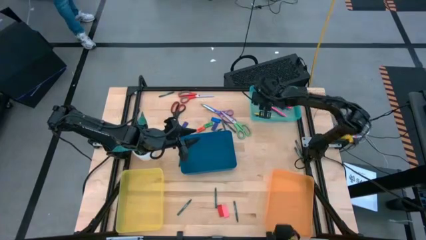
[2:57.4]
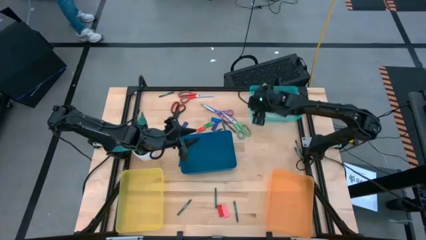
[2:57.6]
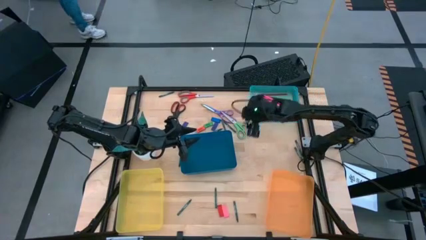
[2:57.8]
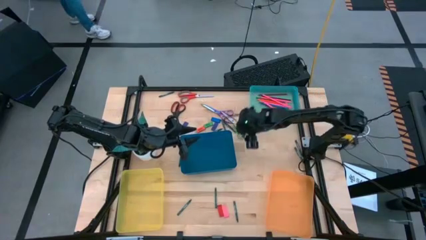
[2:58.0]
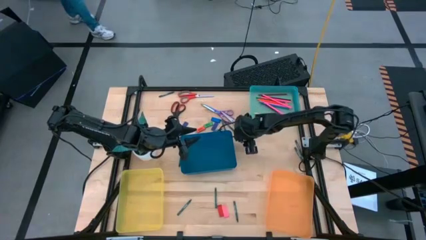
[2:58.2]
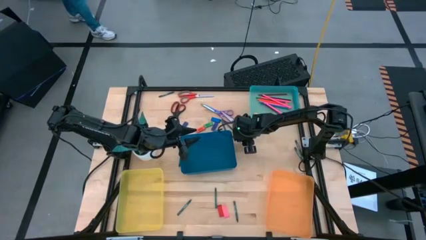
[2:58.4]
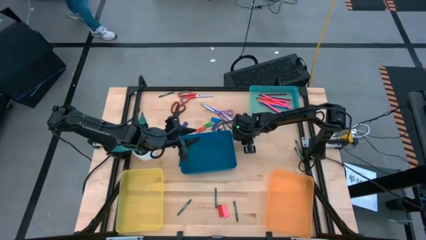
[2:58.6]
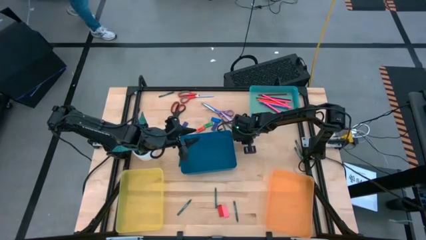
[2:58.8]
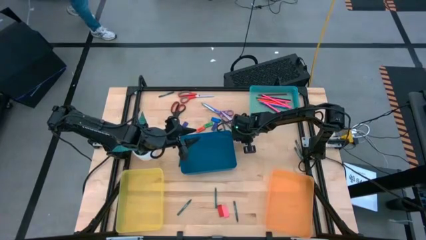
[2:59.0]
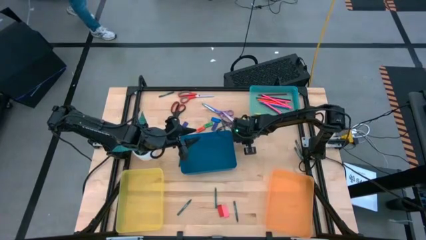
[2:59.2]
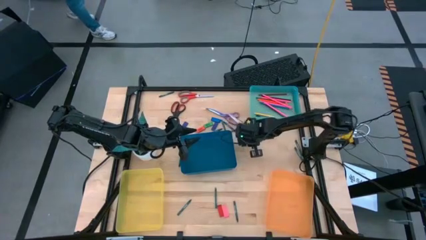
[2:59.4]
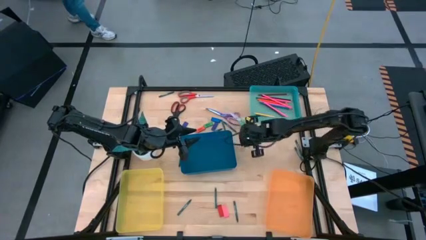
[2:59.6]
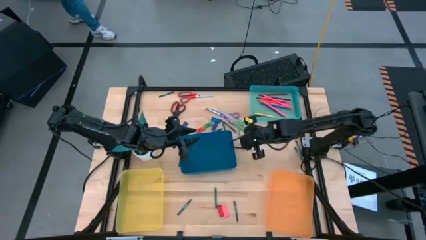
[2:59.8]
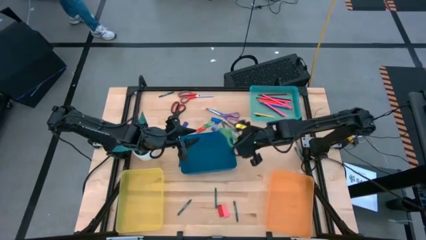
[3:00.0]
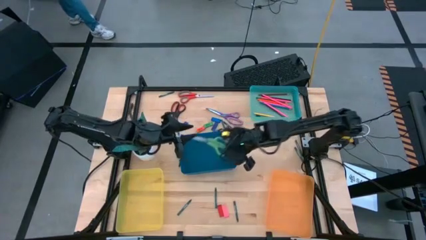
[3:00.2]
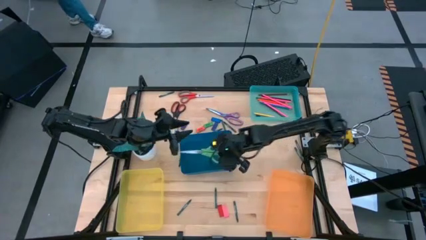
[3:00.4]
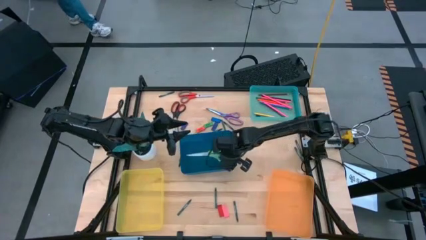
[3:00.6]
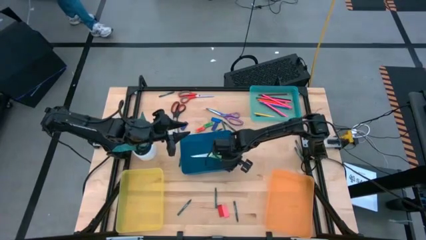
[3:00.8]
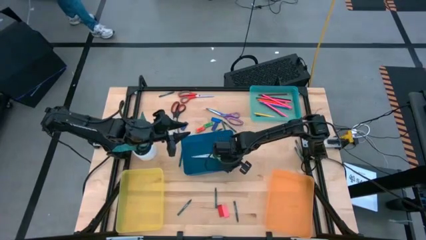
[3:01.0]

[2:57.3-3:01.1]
Task: Sort crayons/erasers/pens/pencils in bins
Put the green scissors into the blue bin

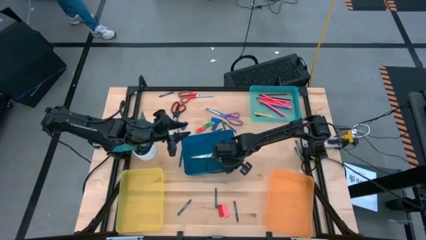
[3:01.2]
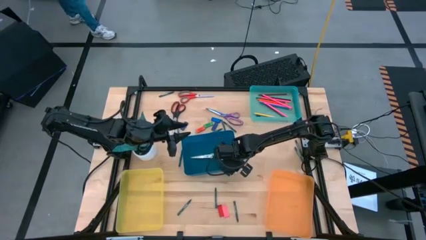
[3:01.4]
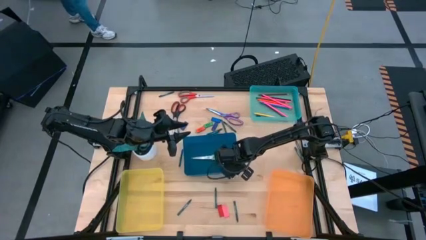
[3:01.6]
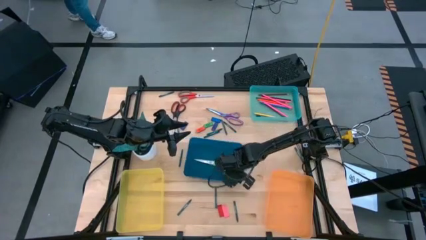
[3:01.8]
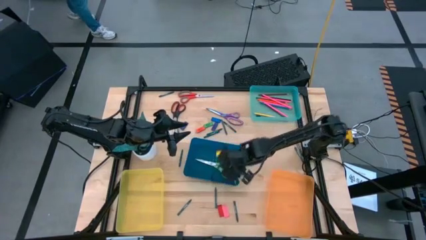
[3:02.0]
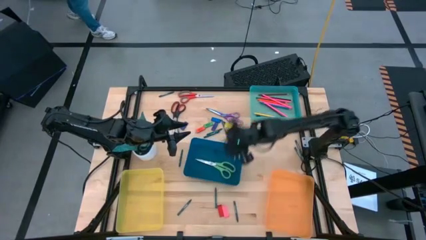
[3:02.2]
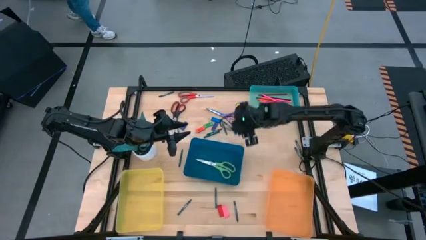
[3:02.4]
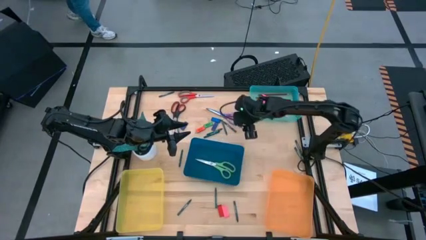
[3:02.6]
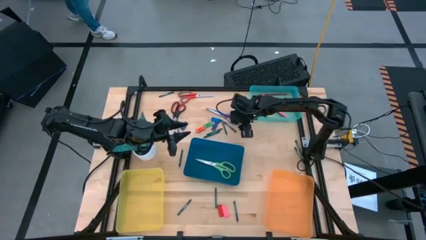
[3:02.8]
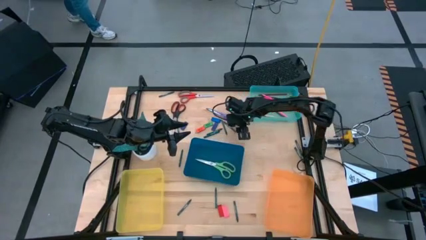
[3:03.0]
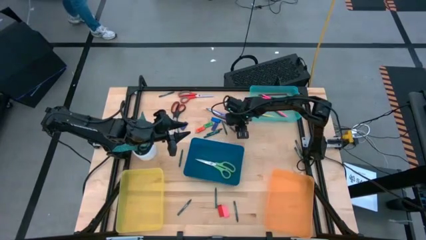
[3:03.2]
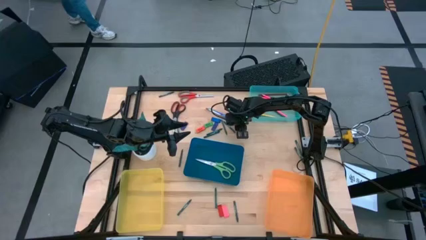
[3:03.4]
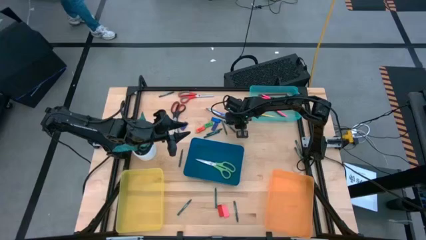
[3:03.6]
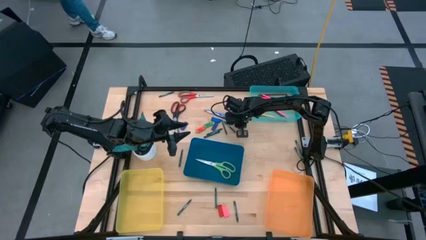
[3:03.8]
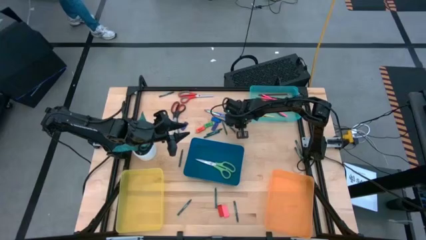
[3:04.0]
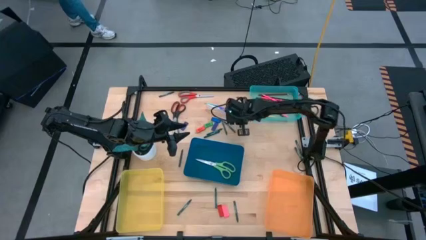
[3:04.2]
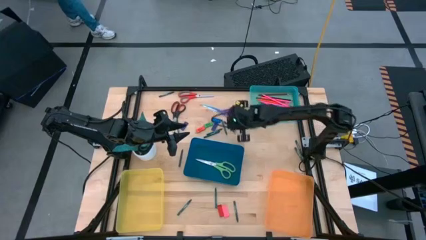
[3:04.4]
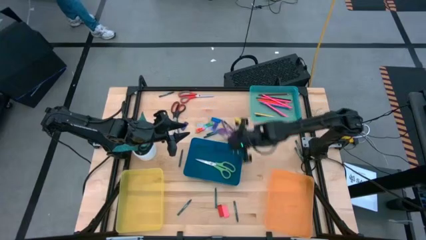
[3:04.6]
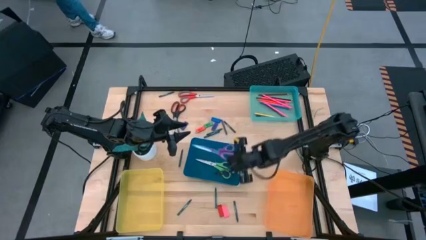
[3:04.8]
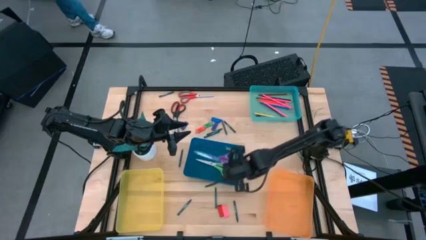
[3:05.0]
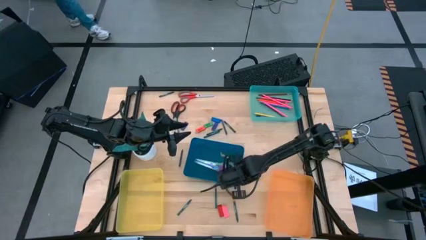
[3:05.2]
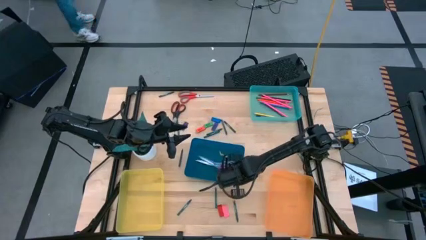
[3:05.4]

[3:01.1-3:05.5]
Put the purple scissors into the blue bin

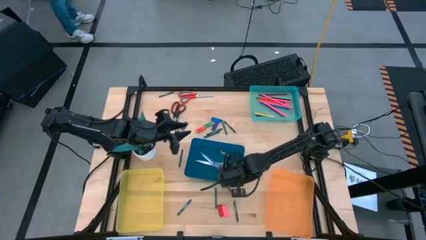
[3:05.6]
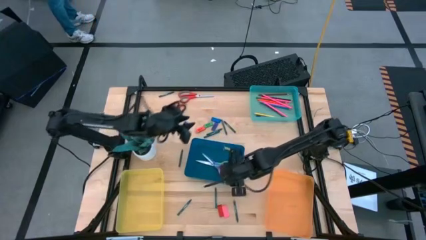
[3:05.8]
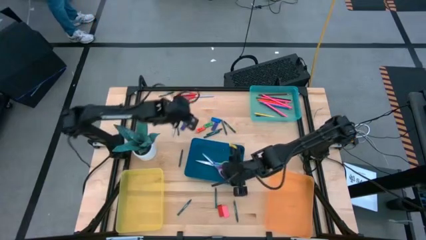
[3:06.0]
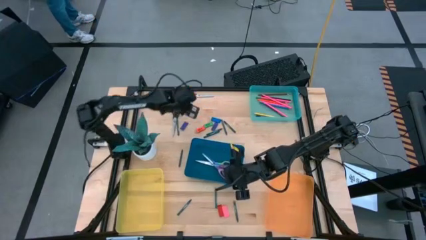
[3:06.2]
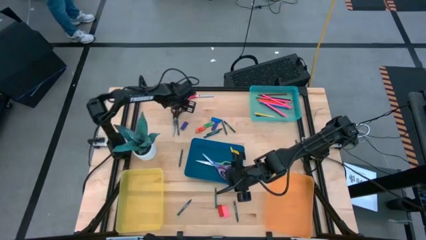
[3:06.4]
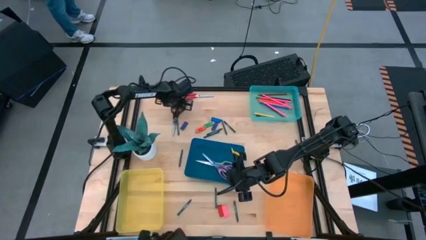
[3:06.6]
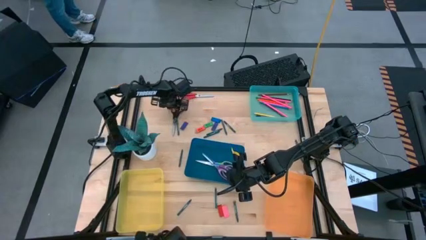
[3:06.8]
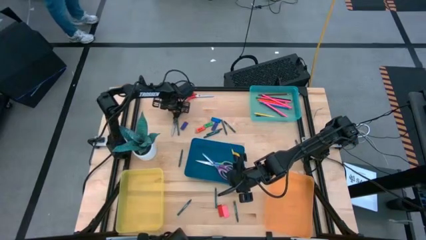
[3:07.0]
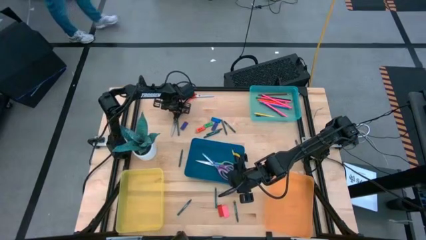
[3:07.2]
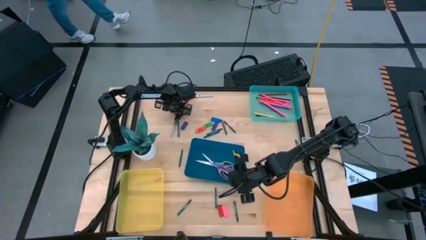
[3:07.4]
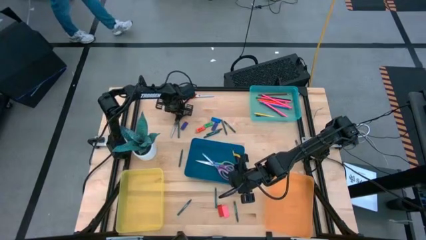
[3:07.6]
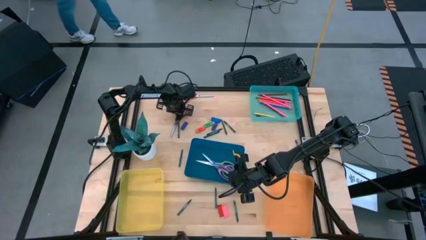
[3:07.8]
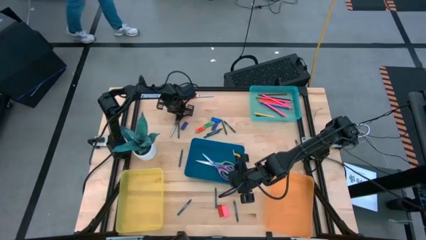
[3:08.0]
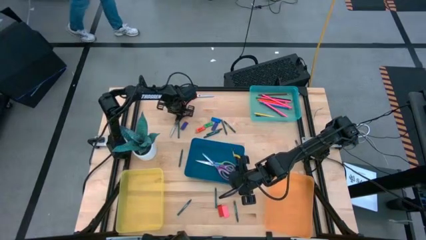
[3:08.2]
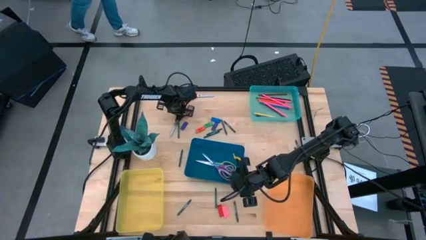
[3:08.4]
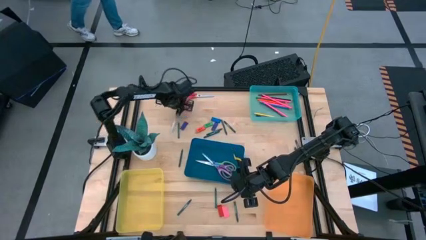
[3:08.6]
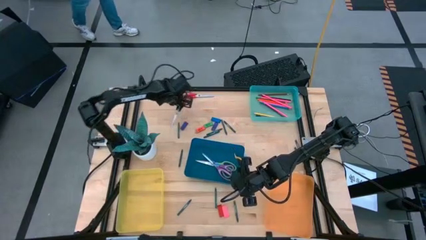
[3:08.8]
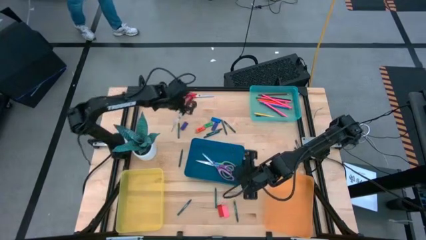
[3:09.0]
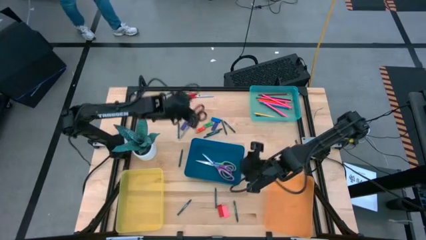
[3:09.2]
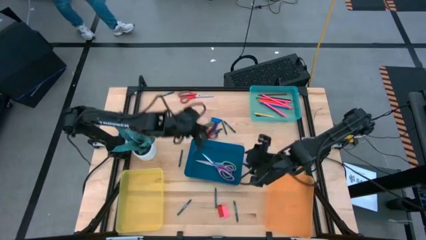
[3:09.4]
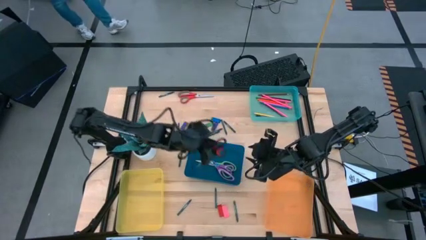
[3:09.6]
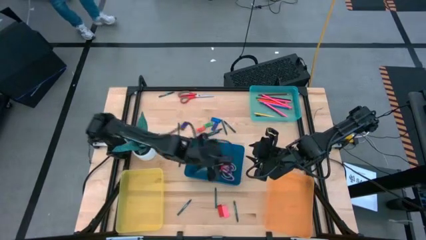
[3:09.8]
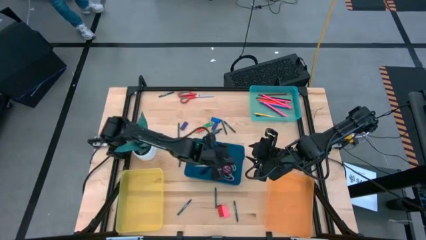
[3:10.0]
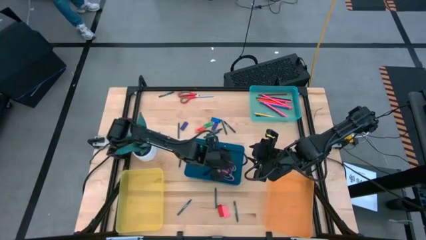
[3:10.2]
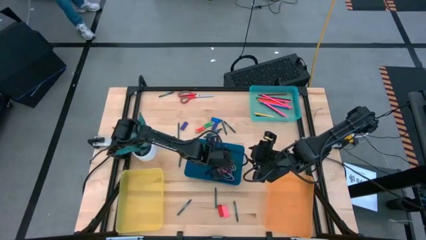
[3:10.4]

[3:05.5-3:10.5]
Put the black scissors into the blue bin

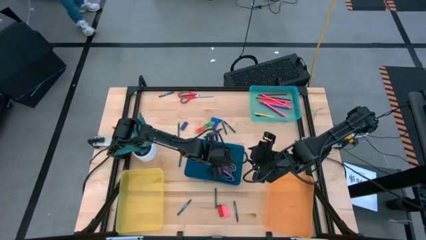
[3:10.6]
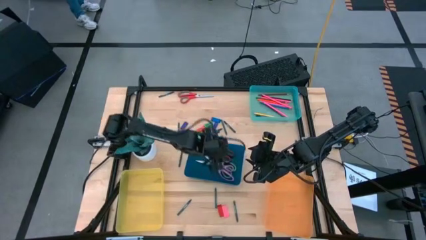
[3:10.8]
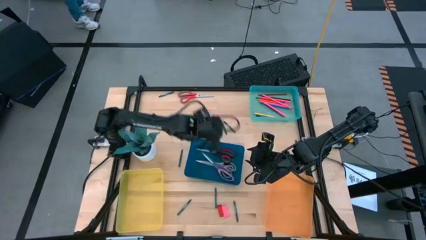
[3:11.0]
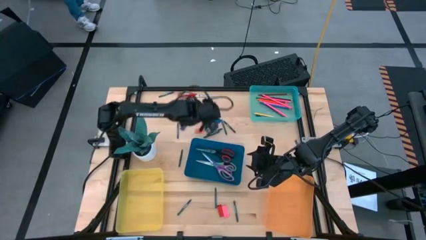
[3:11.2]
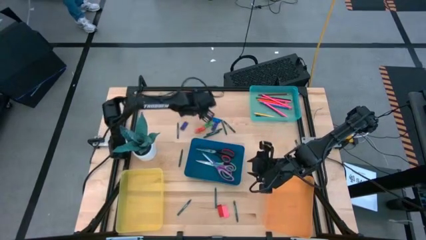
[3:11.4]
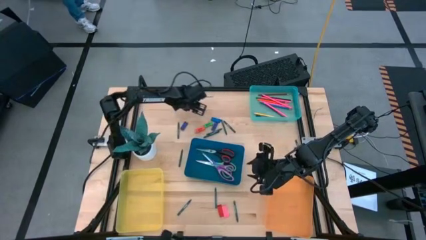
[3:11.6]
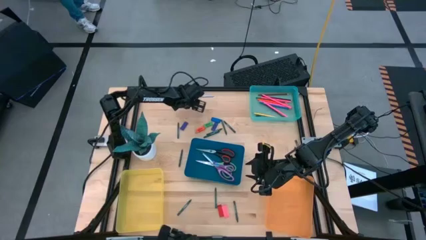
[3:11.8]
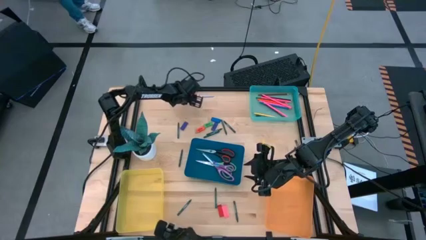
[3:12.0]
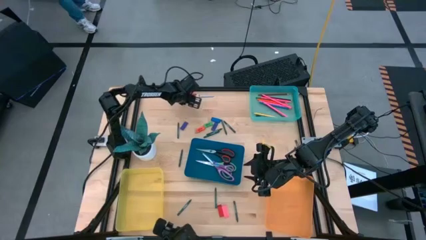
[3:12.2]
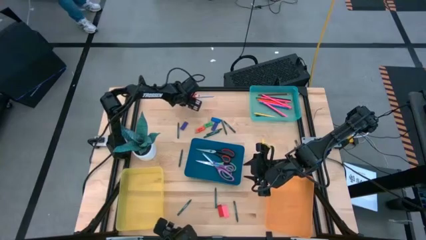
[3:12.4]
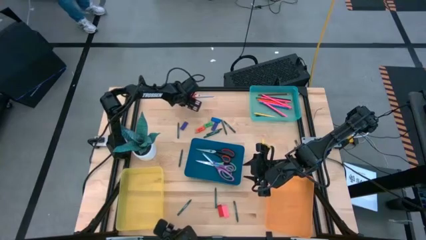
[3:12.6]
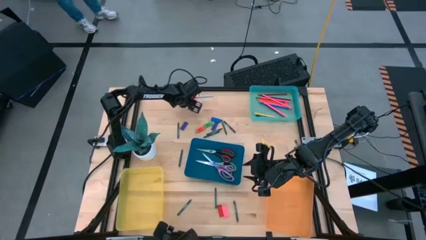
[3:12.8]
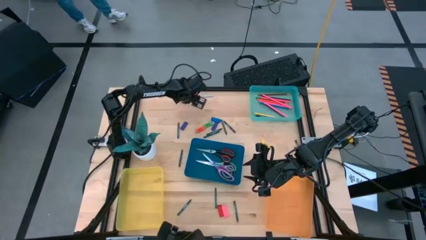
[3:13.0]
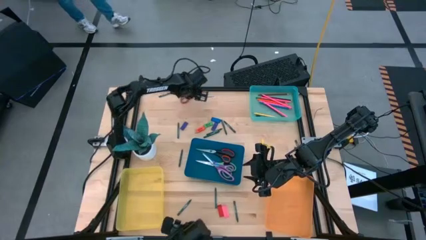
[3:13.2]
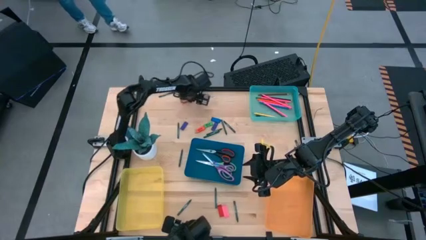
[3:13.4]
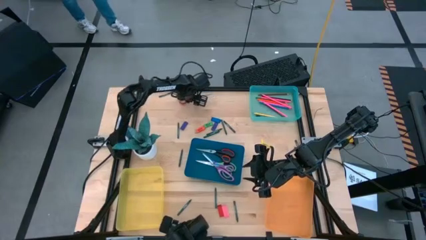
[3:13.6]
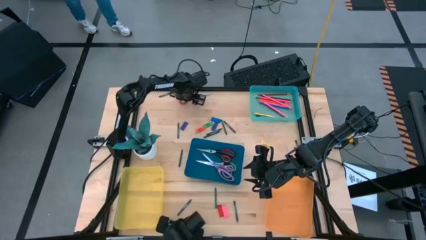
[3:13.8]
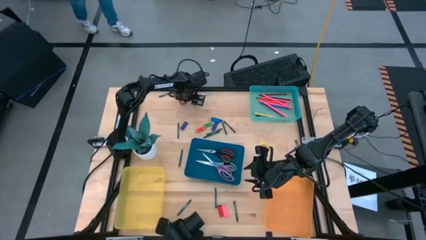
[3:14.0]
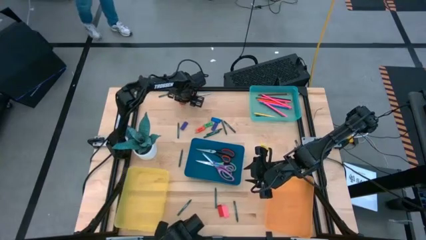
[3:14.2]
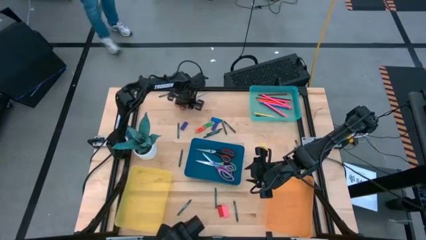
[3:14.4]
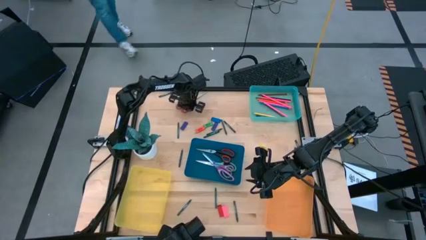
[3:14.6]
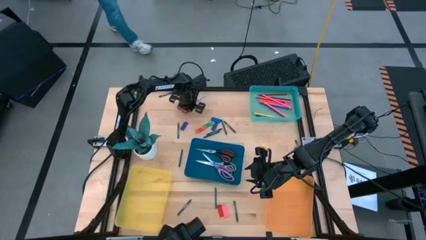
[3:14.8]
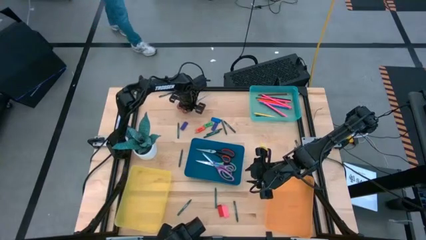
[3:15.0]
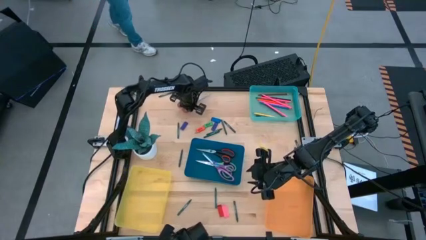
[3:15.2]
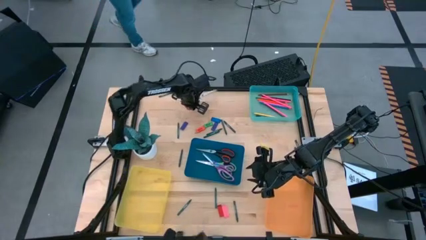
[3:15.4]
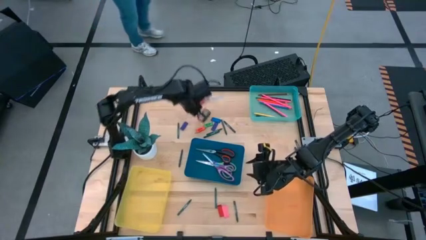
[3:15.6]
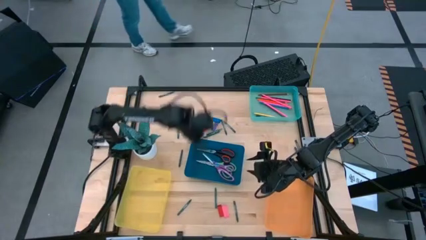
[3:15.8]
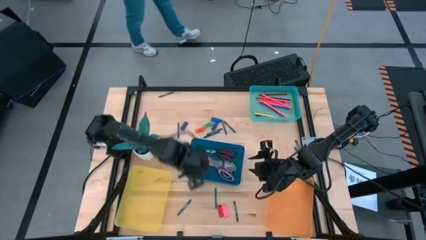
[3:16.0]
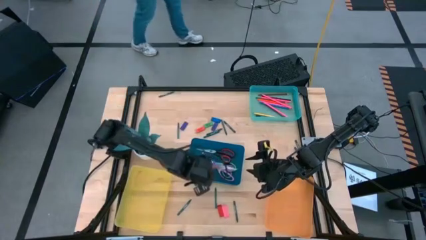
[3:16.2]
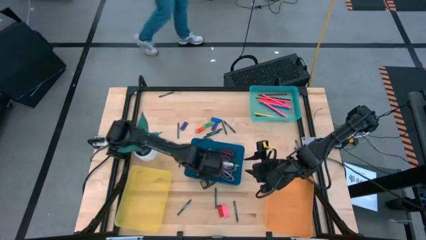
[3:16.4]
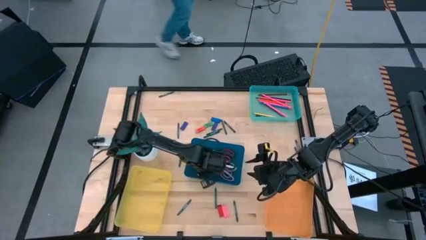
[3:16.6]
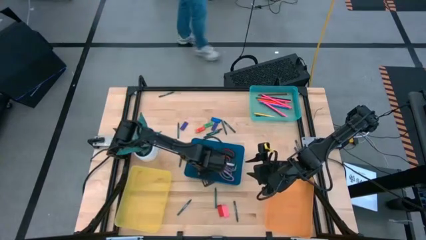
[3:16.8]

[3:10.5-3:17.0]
Put the orange scissors into the blue bin
